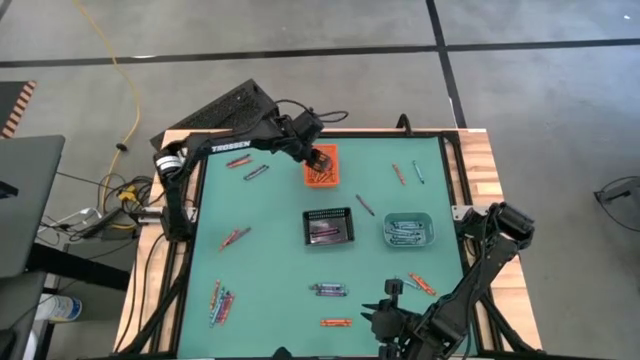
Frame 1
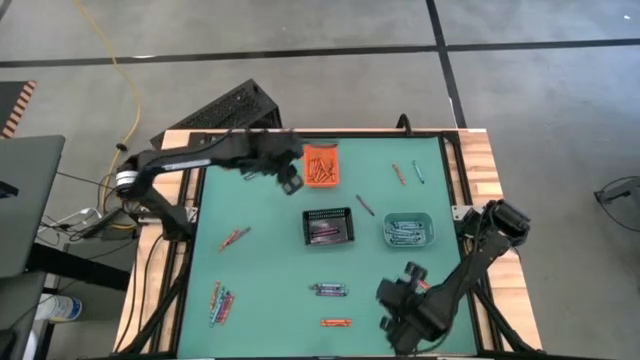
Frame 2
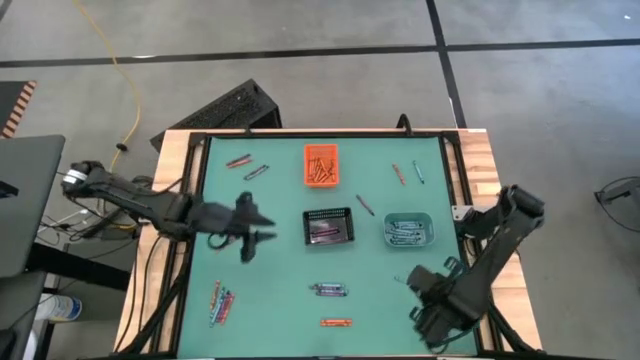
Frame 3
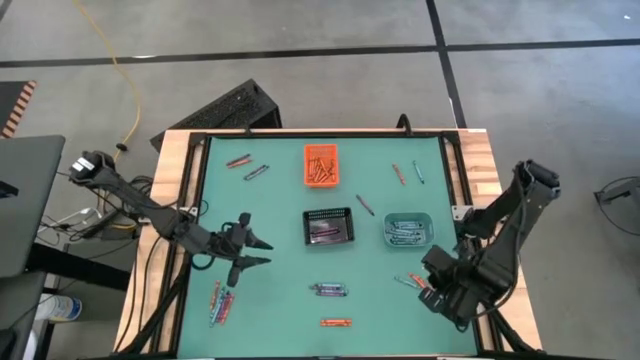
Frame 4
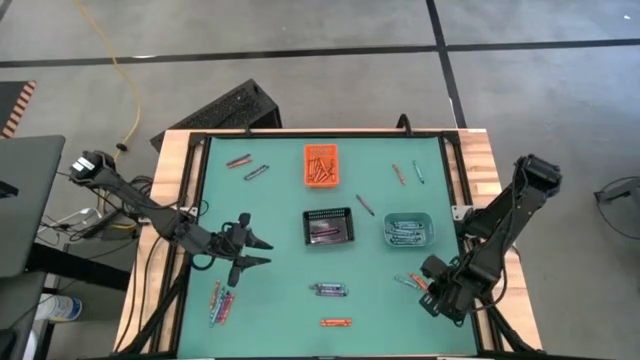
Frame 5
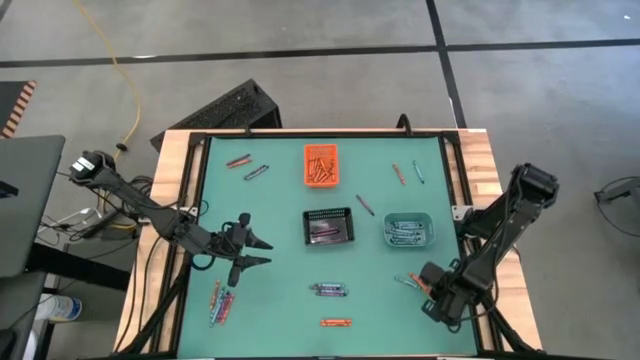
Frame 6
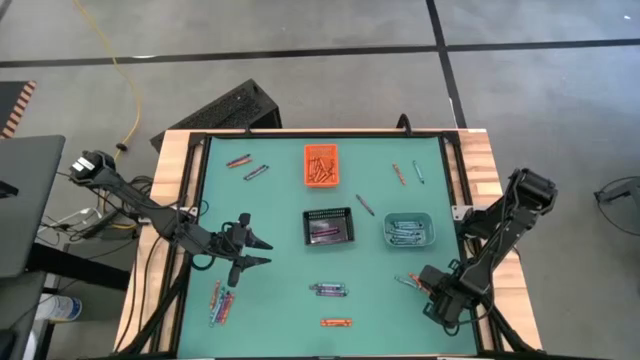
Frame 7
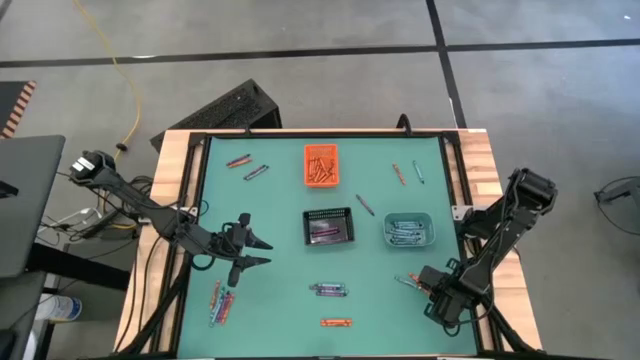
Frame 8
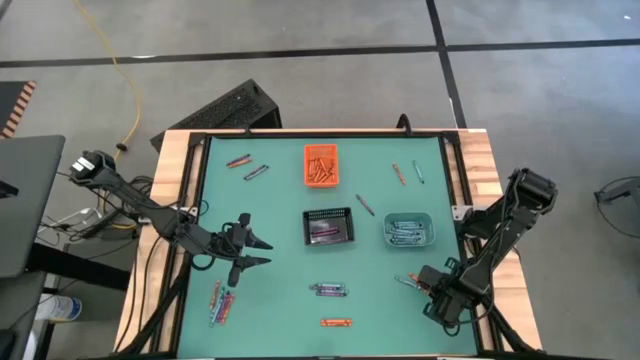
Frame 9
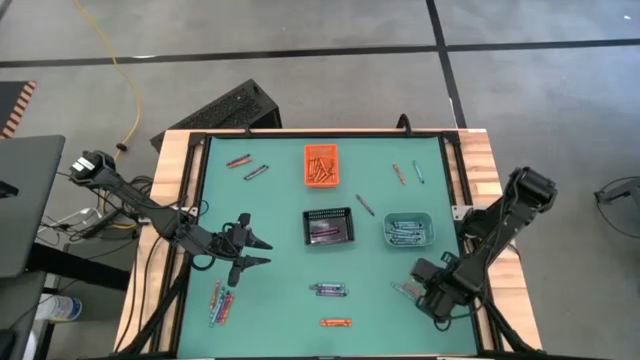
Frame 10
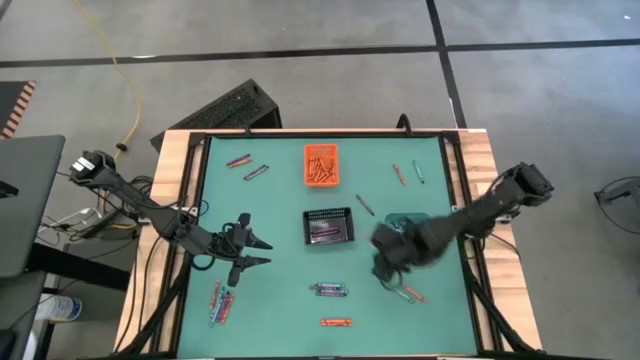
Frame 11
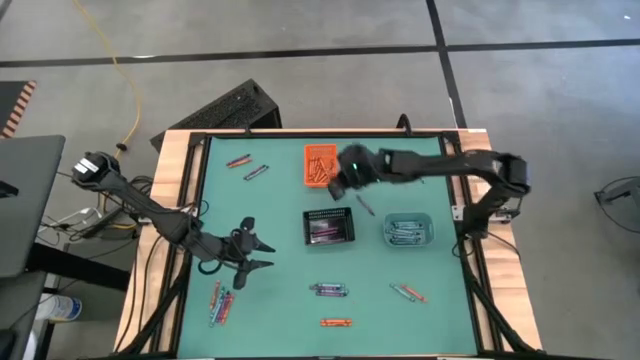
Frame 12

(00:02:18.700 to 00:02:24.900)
Task: Sort crayons
Put the orange crayon into the orange bin

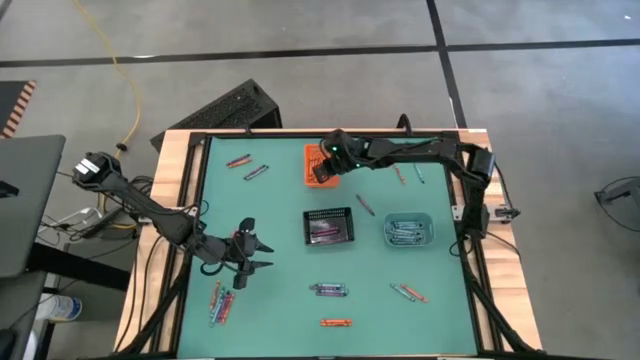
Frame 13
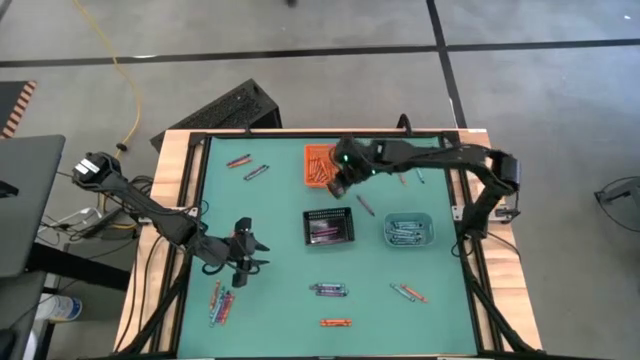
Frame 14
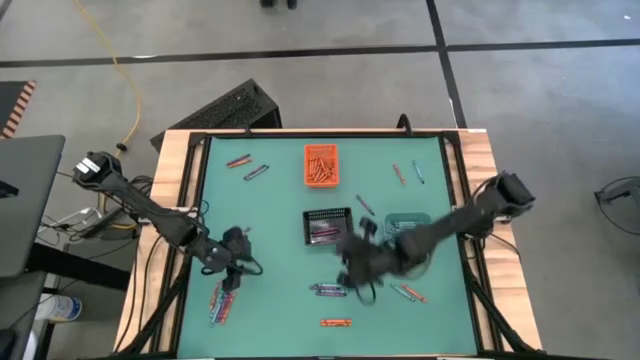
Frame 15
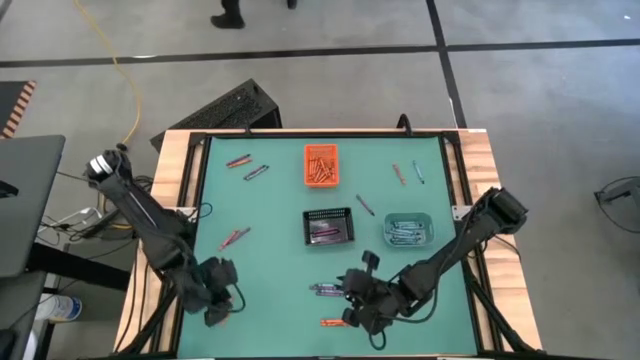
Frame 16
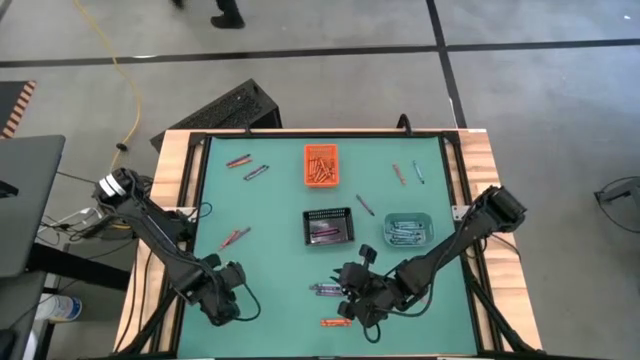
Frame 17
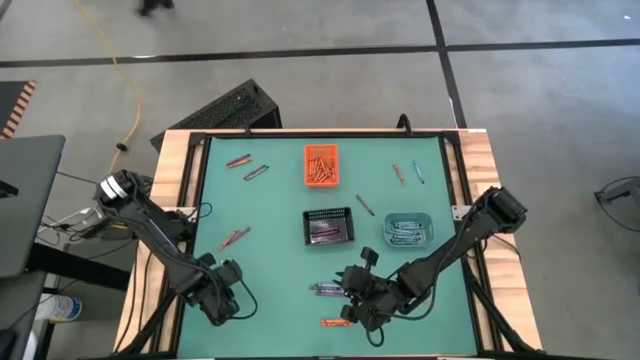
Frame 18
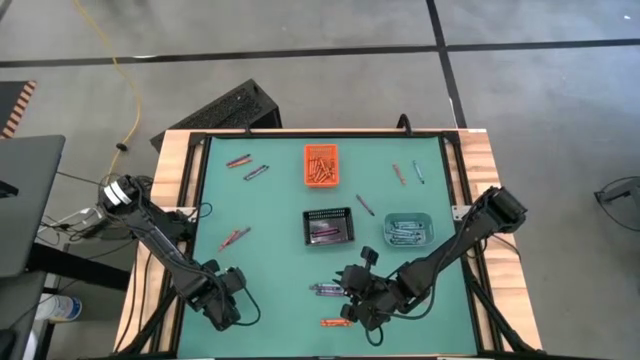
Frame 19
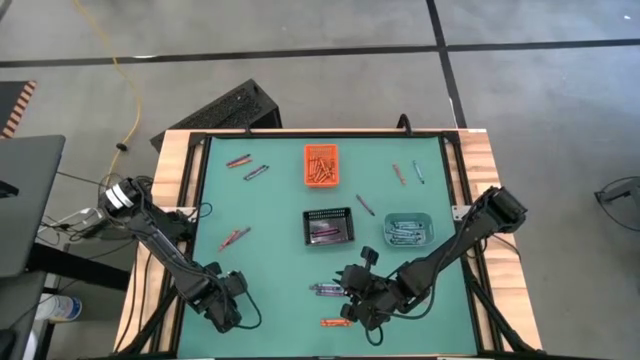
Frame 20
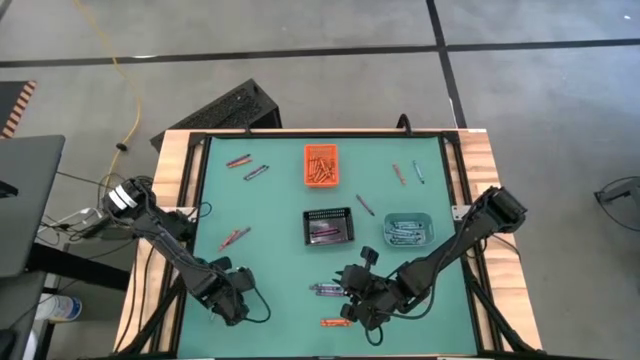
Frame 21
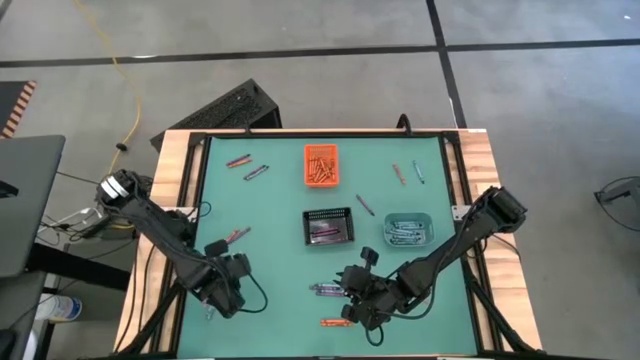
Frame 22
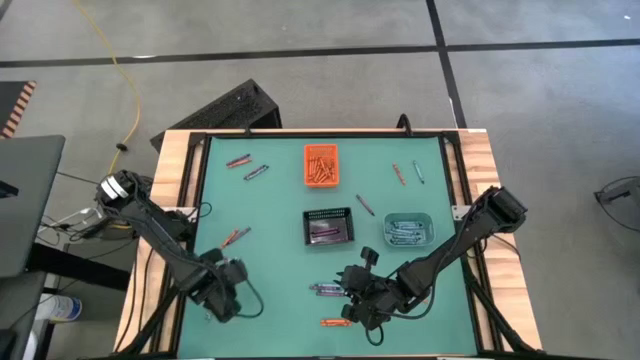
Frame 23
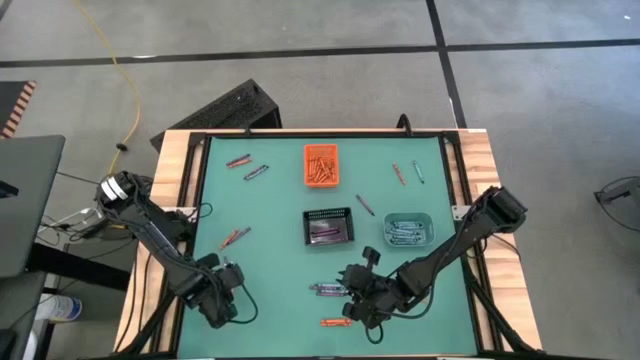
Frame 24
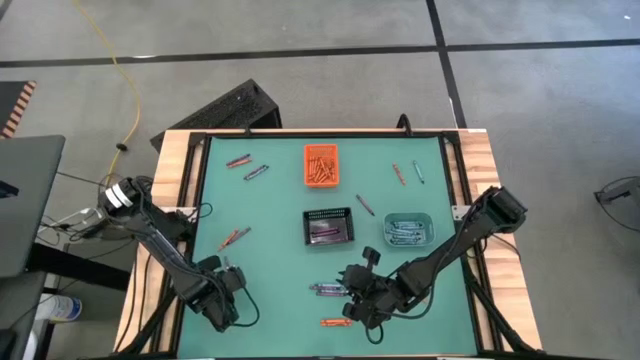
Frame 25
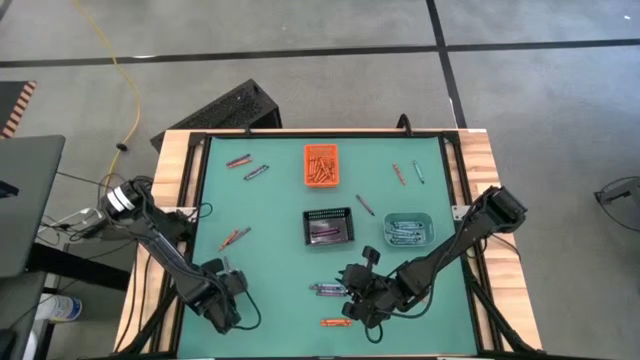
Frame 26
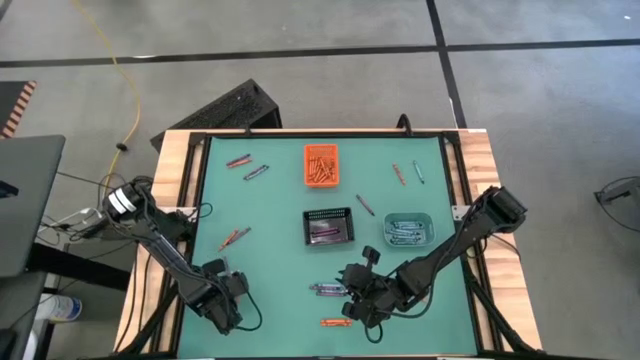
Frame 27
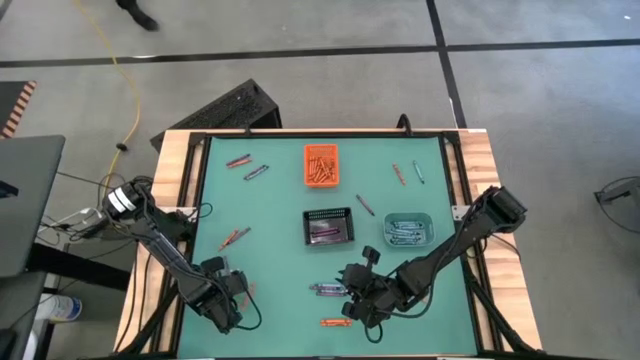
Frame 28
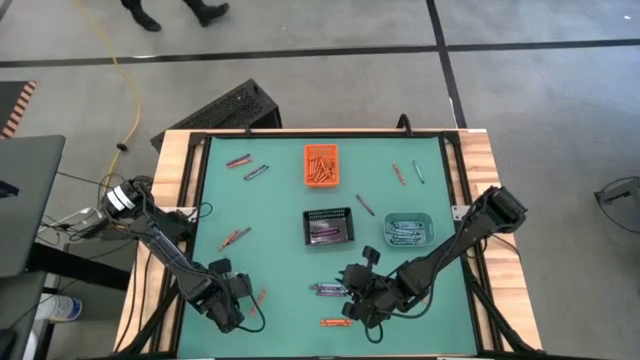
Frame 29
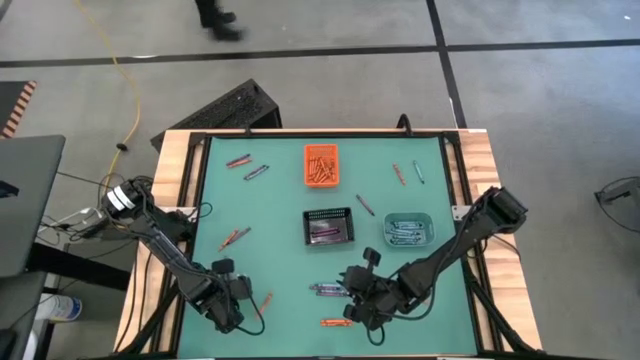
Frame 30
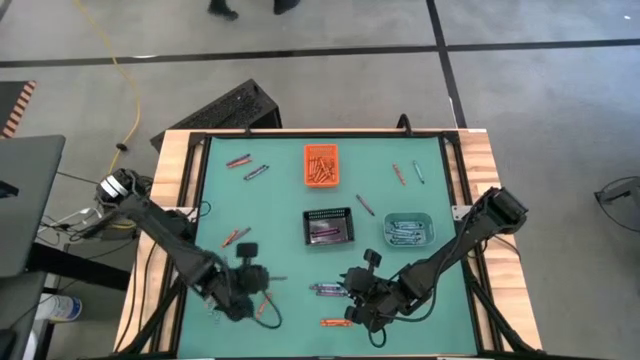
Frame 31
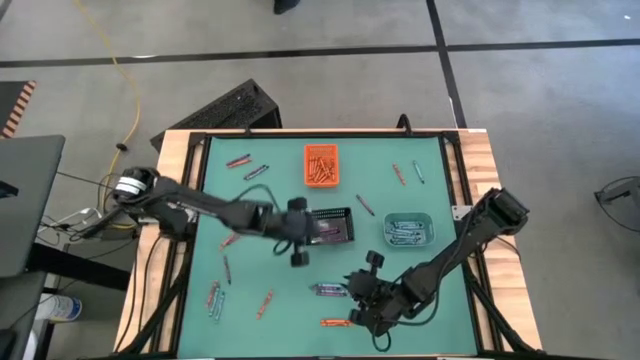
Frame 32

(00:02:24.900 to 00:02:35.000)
Put the violet crayon into the black bin

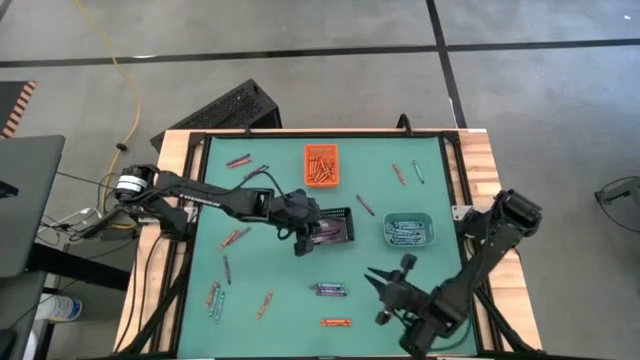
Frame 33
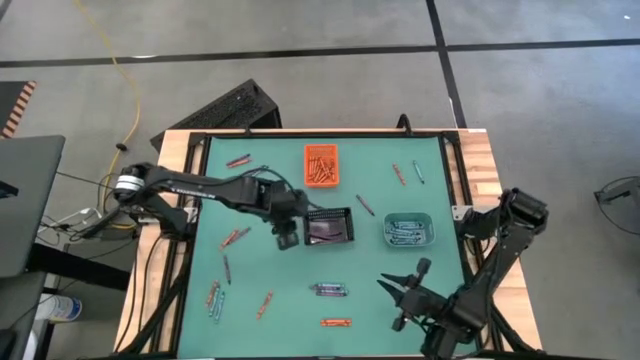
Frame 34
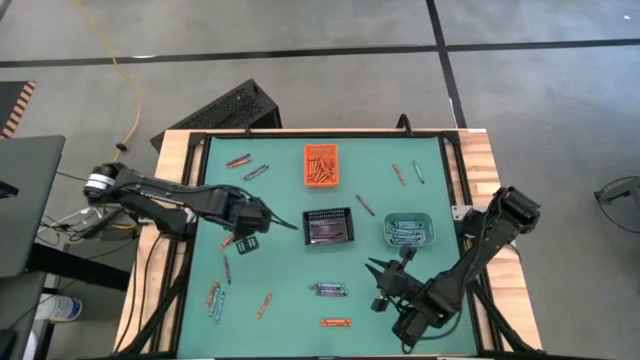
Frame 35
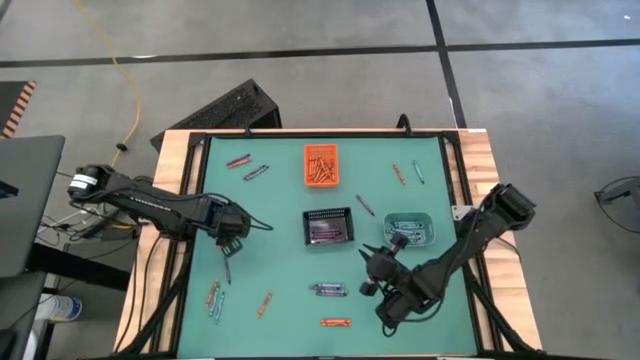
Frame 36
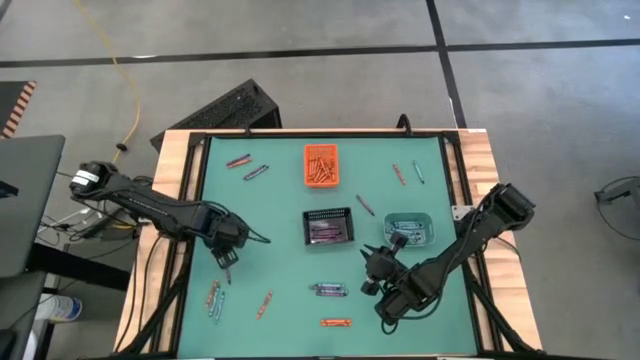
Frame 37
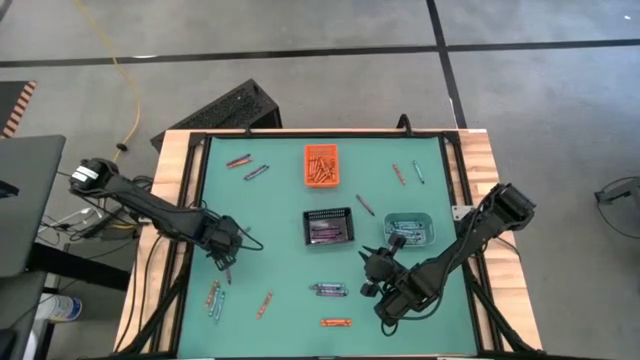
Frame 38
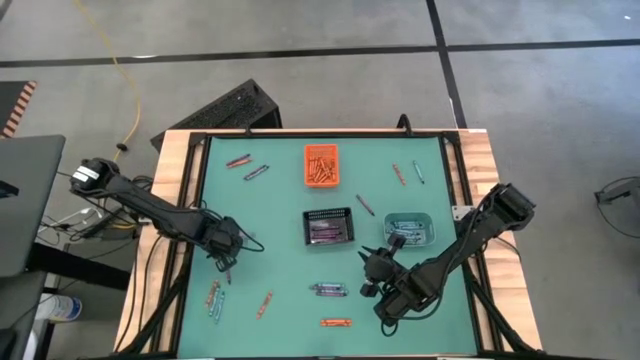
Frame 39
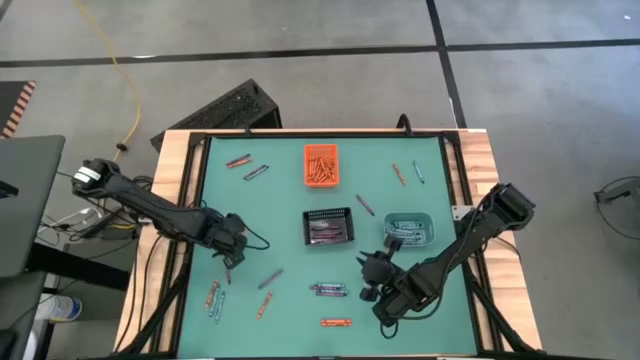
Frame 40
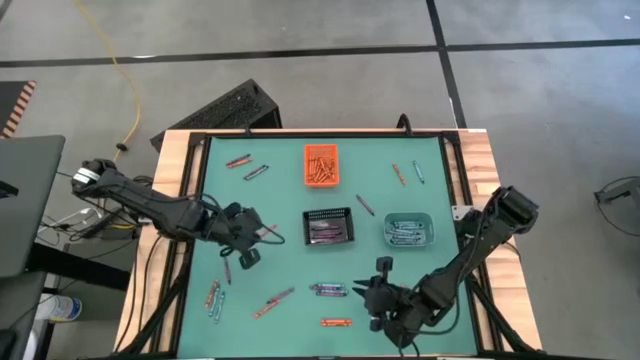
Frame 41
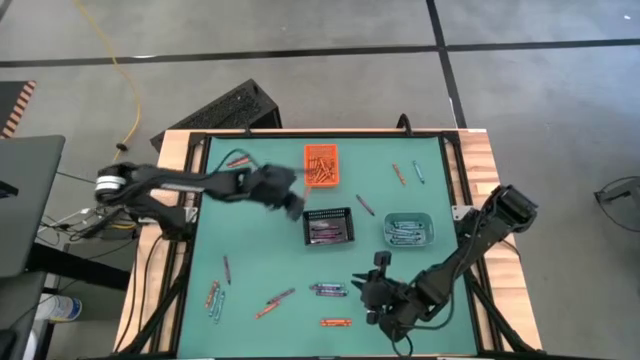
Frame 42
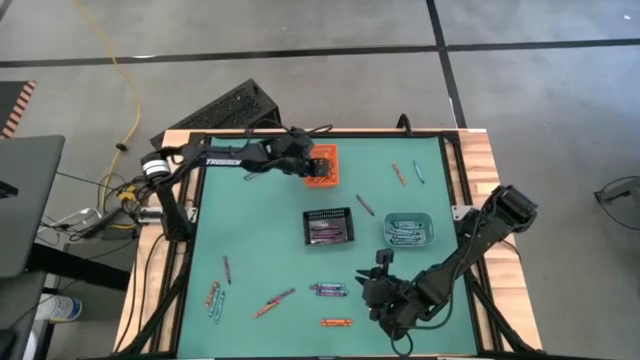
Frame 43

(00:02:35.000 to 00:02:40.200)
Put the orange crayon into the orange bin
